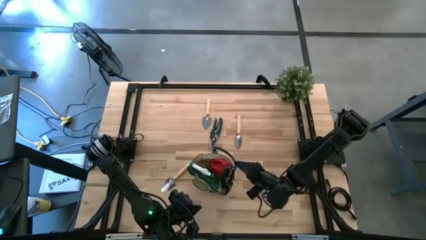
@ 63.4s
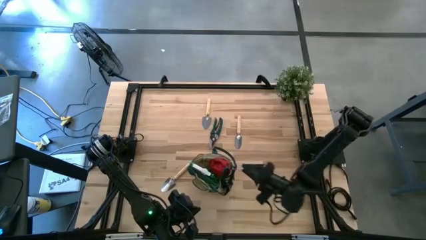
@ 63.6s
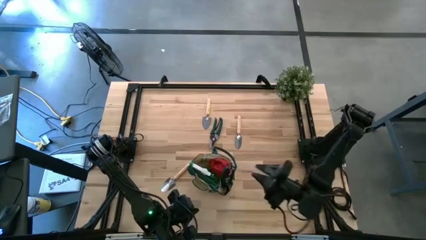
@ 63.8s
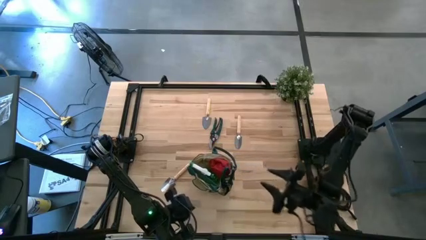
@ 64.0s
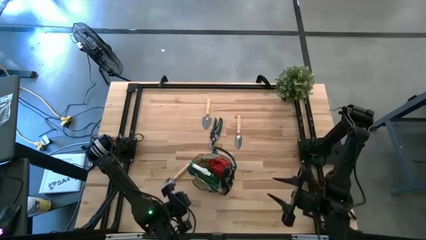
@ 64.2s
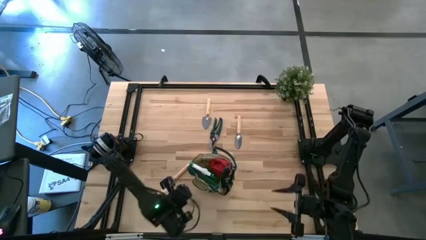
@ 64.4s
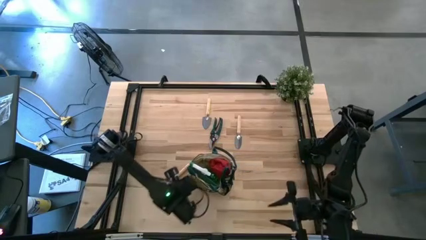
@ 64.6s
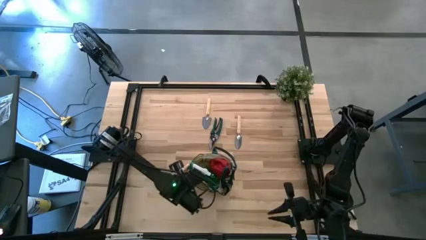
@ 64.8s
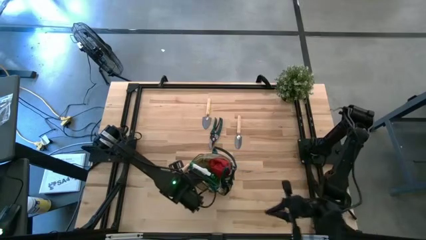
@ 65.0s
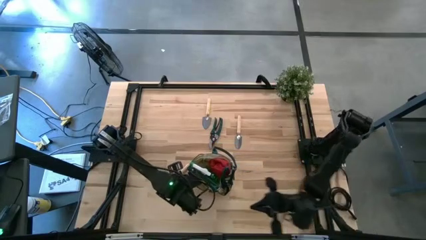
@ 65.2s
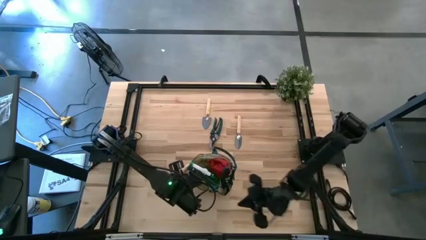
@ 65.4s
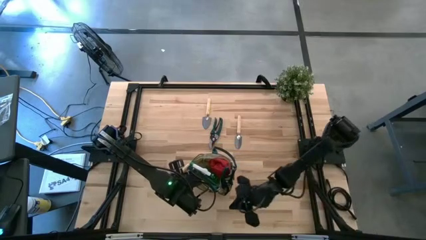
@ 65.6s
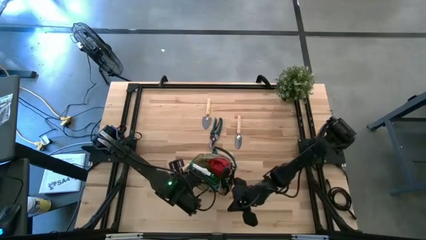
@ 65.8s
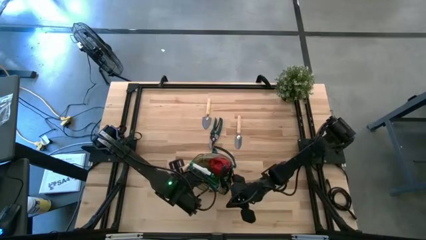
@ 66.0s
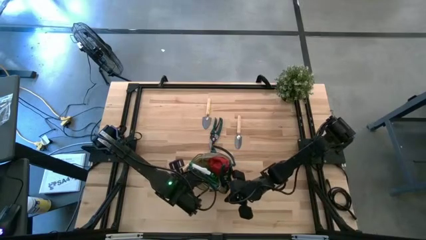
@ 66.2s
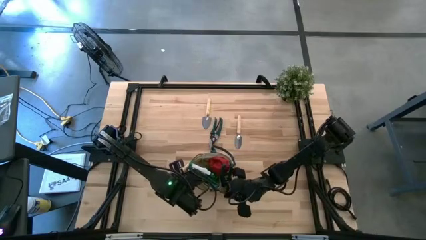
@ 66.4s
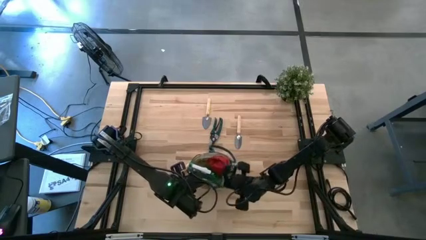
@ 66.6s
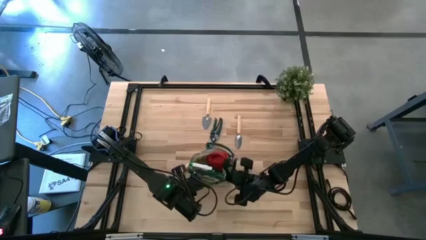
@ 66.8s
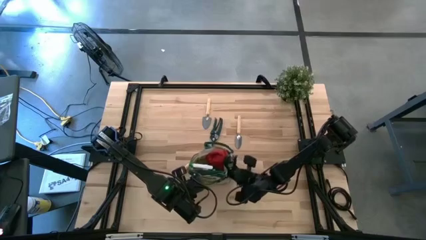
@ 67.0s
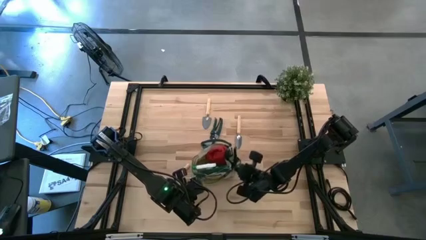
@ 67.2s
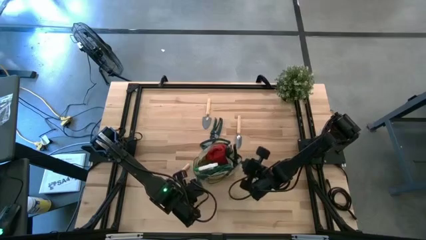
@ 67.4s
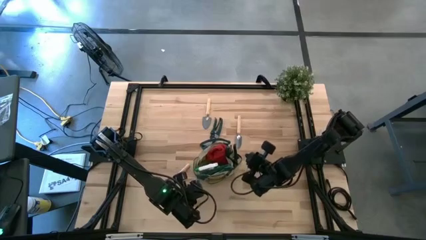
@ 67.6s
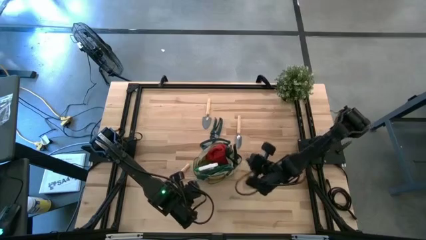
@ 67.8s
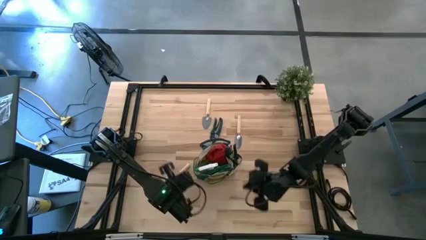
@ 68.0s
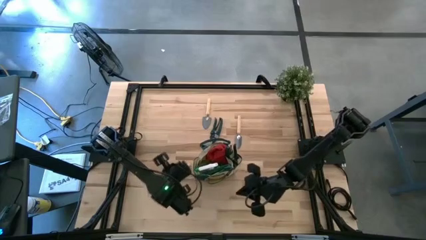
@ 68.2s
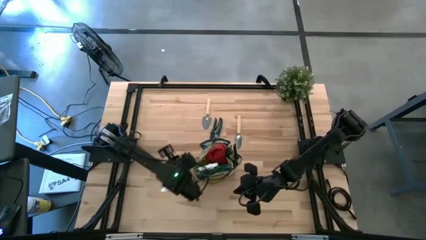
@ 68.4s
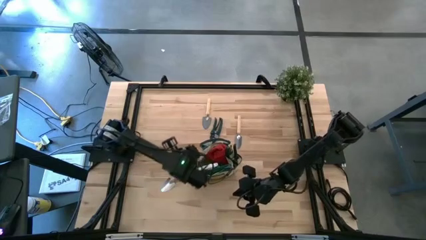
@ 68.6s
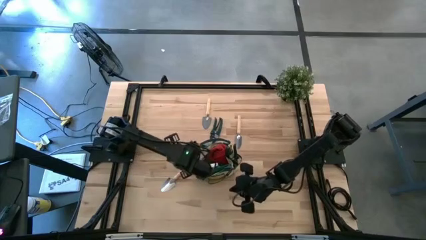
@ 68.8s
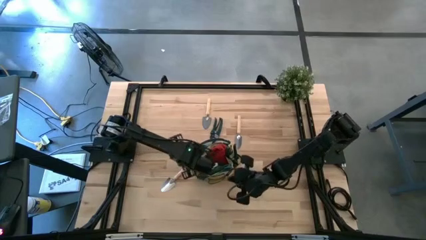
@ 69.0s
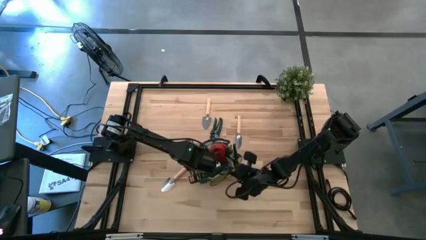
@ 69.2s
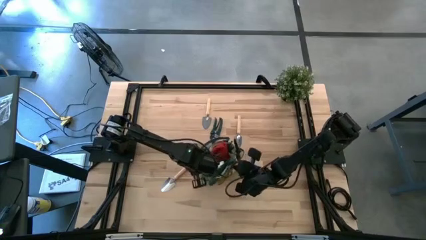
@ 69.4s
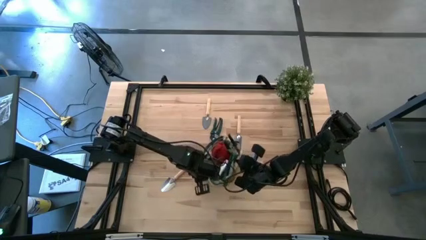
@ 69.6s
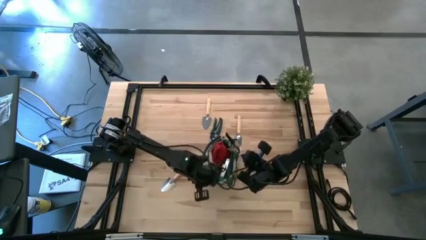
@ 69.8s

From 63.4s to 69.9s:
Task: Pick & Place Garden tools in Gardening bag
Adjust the gardening bag

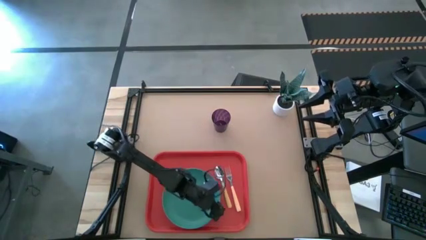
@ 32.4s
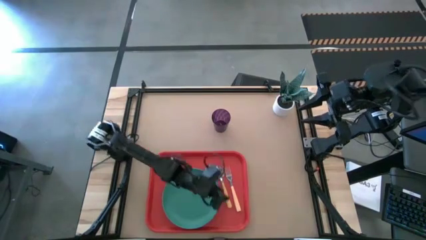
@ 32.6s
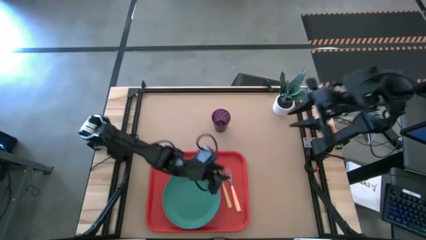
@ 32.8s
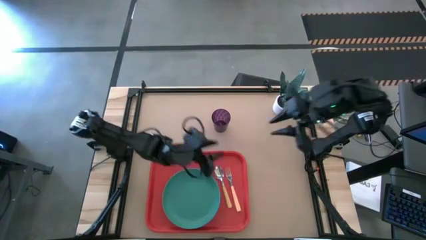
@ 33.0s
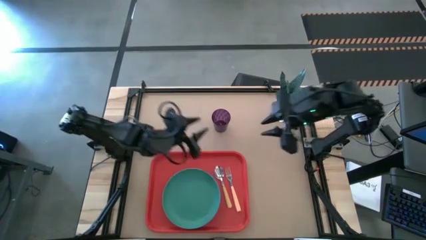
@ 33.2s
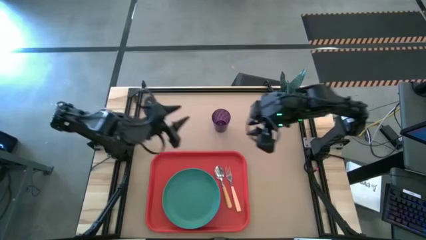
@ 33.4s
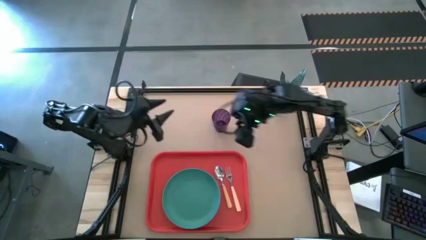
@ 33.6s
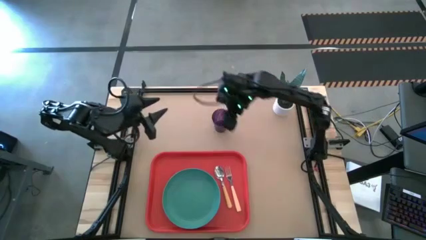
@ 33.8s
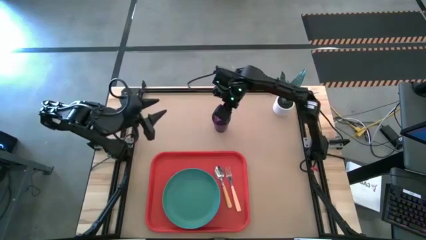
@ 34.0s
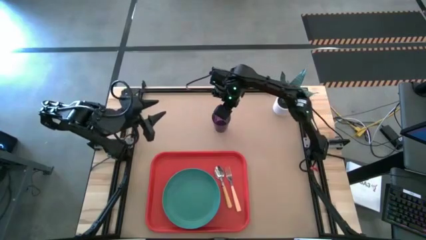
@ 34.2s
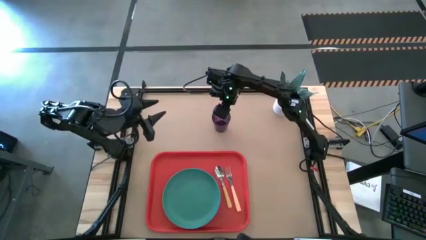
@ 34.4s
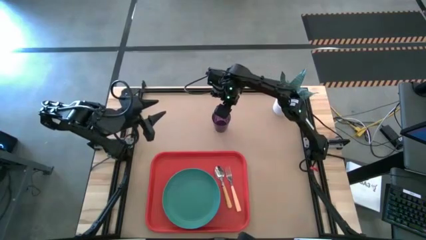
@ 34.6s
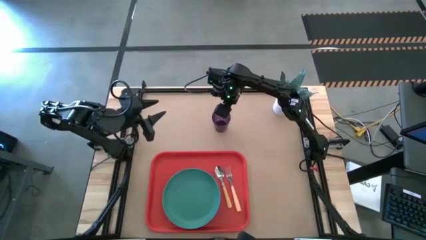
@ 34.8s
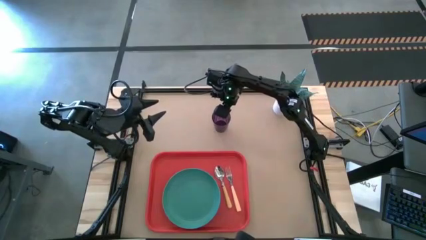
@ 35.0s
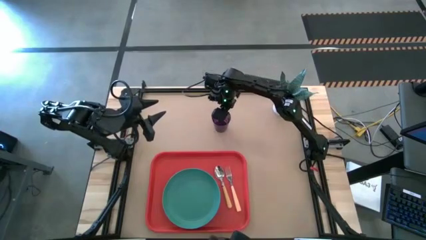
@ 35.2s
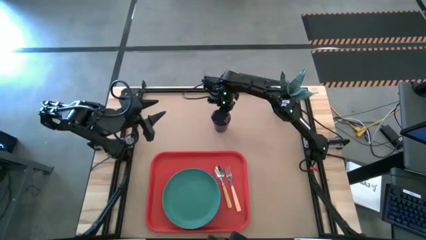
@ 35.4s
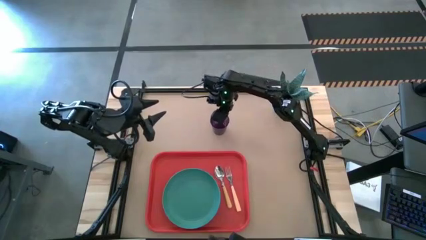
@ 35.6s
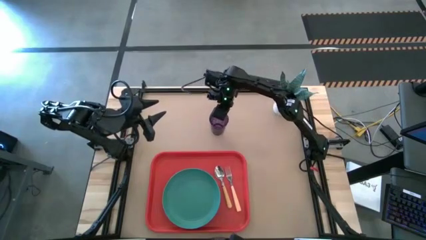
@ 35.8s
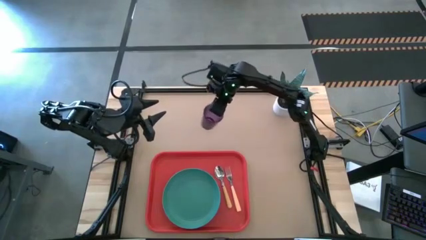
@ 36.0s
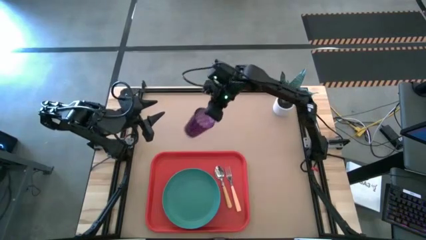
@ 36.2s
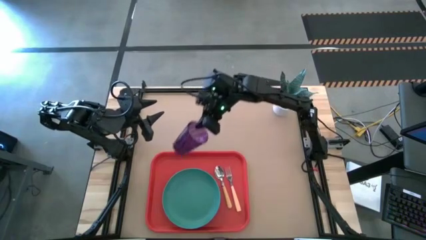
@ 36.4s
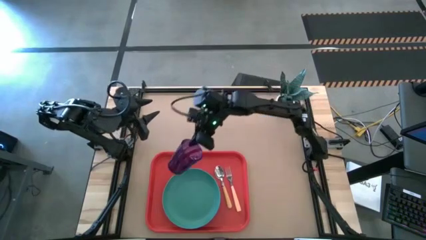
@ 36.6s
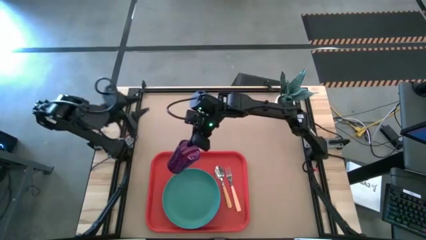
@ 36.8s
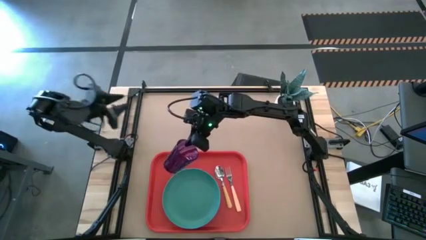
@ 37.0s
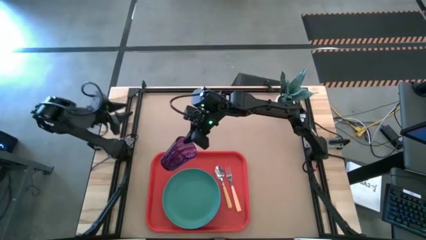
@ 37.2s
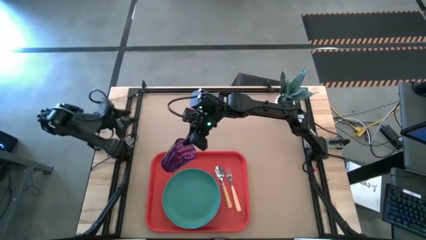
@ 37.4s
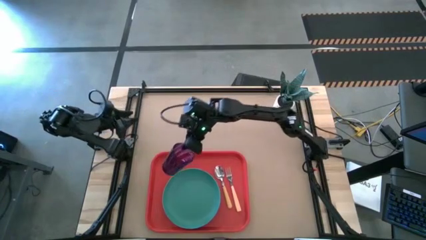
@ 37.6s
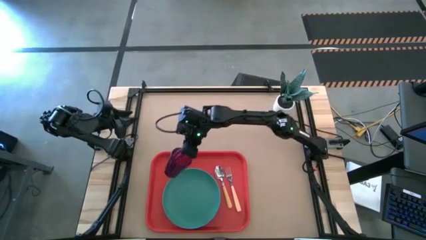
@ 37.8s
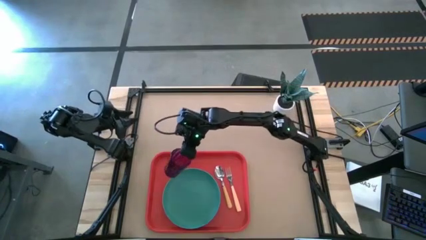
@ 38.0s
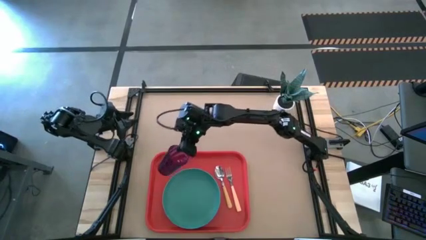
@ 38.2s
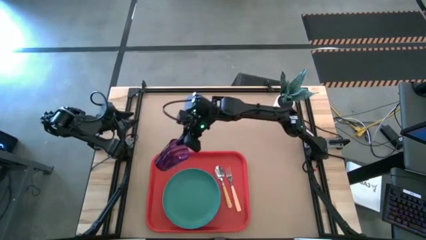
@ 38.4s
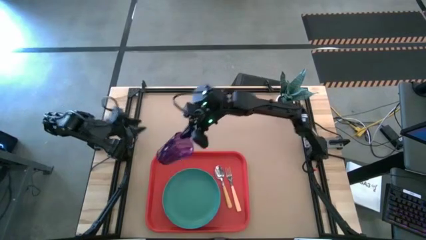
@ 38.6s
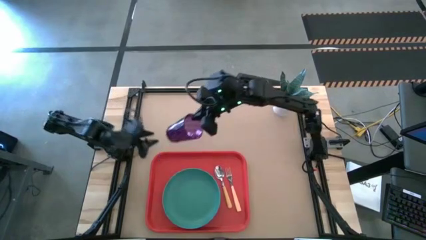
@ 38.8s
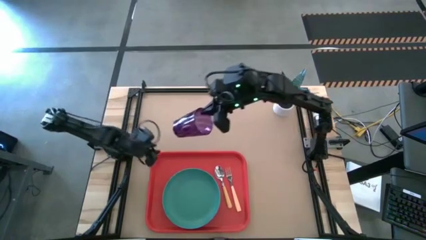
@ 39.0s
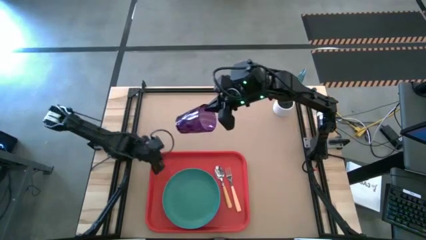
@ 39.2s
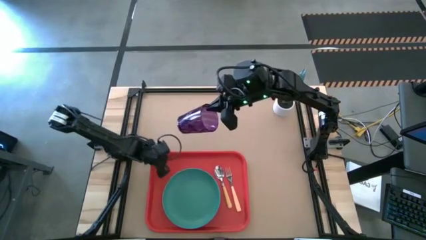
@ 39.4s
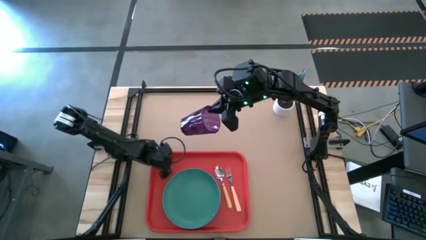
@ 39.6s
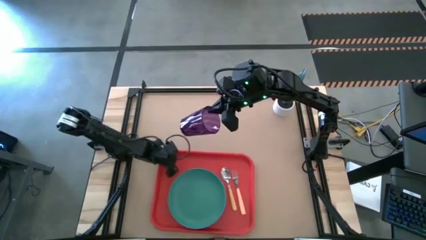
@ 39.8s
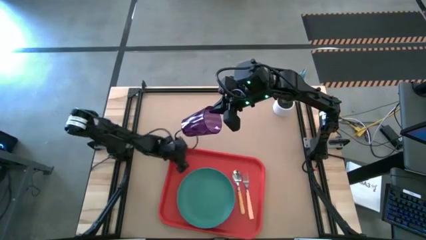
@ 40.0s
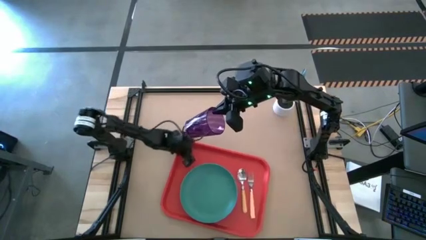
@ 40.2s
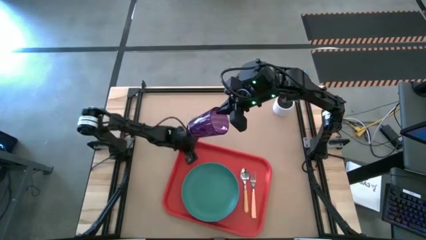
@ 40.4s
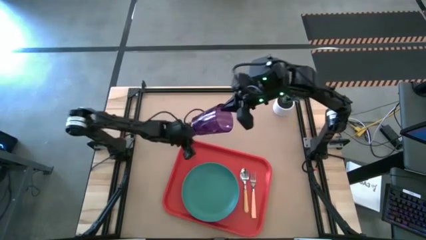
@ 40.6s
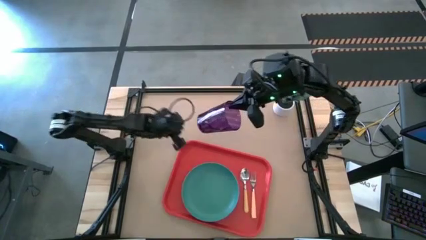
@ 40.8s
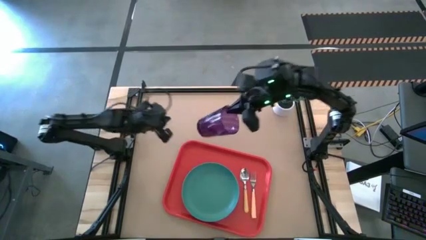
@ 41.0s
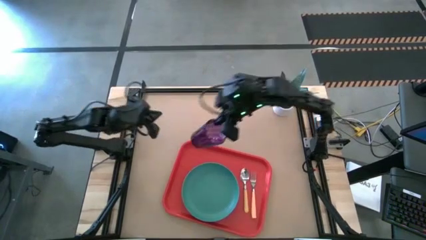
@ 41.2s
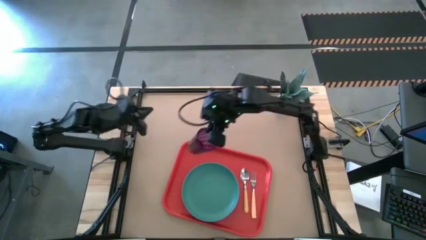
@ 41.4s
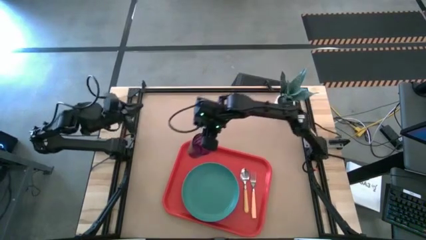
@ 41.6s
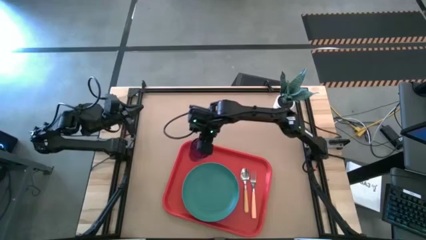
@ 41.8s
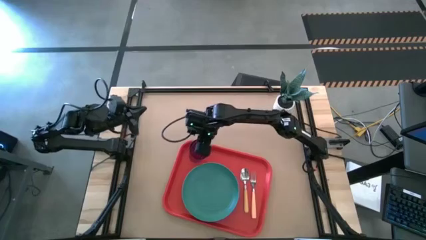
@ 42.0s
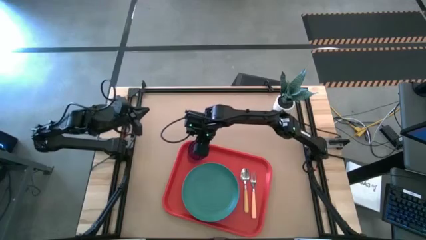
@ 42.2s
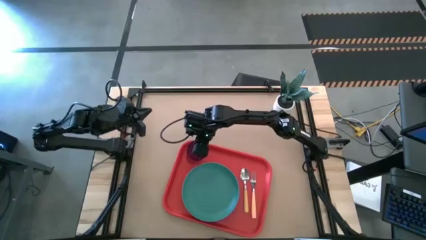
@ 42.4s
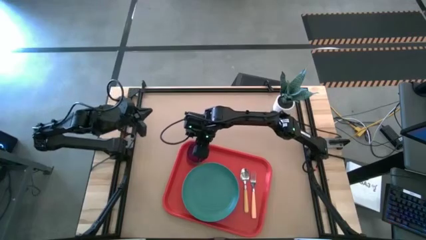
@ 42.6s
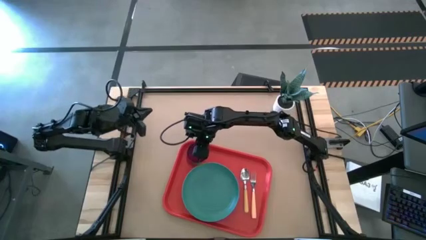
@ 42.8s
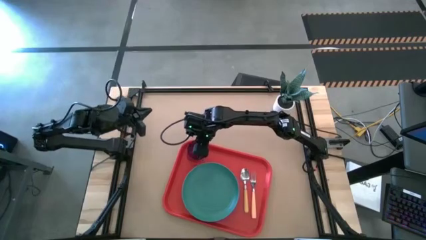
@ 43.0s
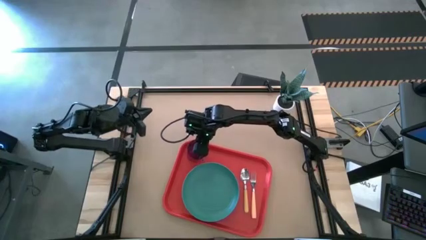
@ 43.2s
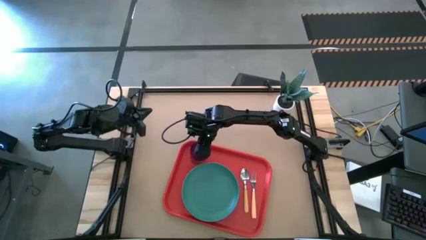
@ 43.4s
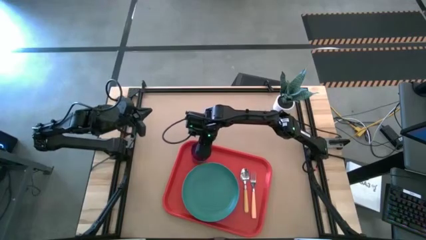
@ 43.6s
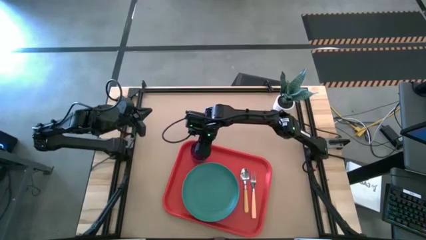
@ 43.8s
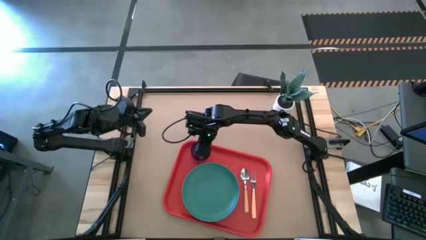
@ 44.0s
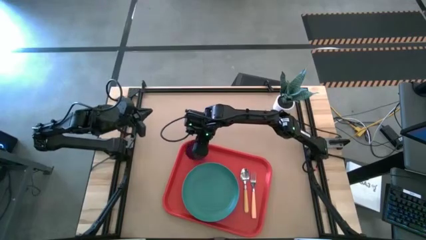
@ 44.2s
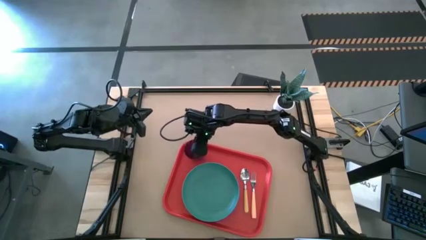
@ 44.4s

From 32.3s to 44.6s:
Task: Pick and place plate/cup/fork/spoon on tray
Put the violet cup on the red serving tray to the top left of the green plate
